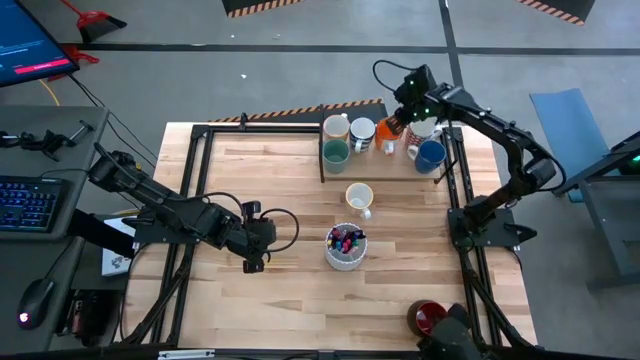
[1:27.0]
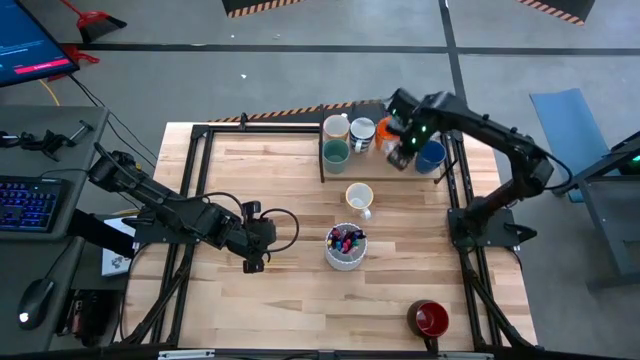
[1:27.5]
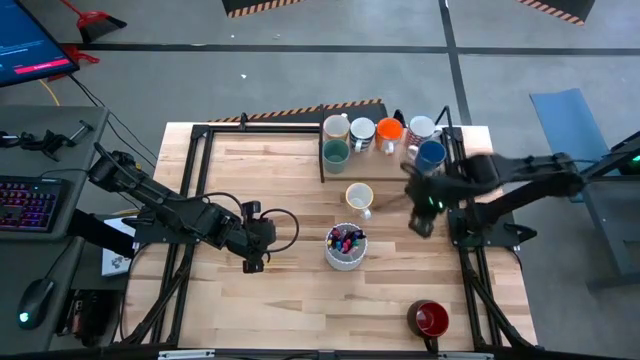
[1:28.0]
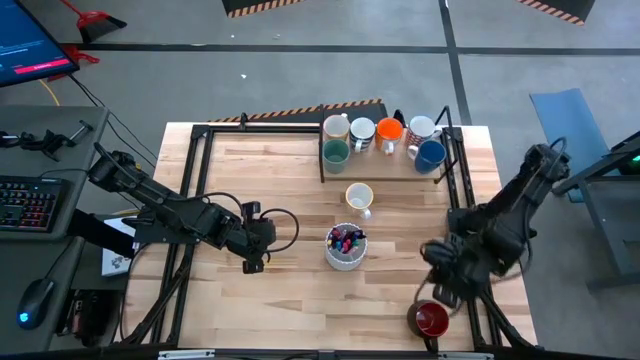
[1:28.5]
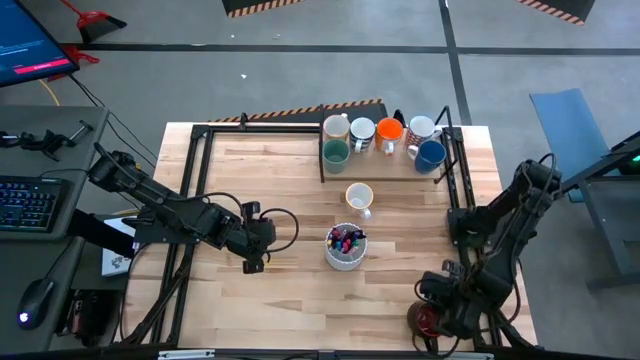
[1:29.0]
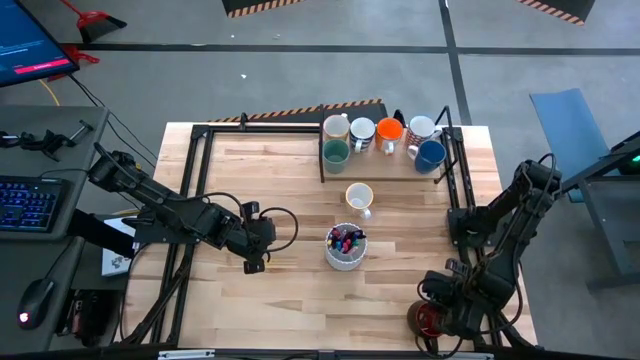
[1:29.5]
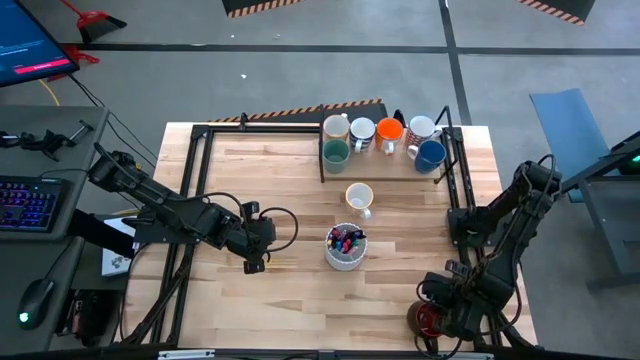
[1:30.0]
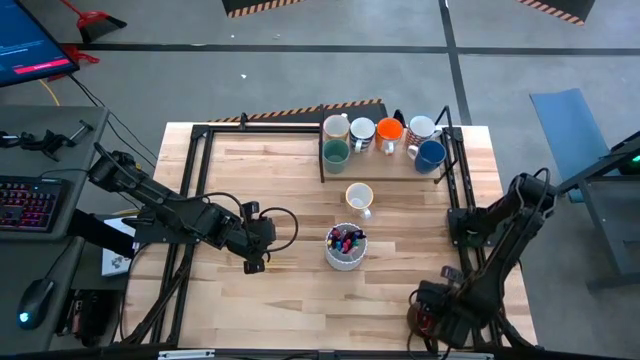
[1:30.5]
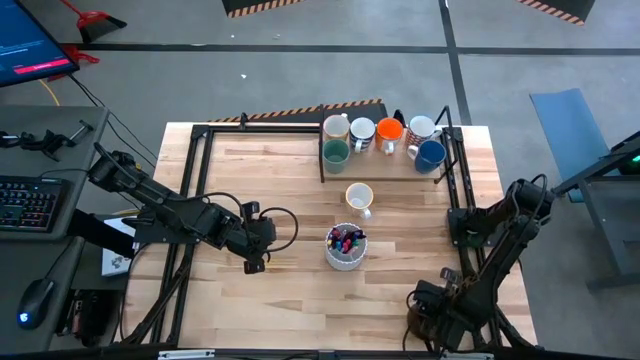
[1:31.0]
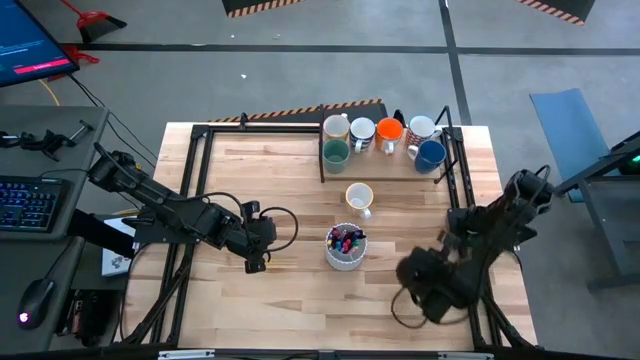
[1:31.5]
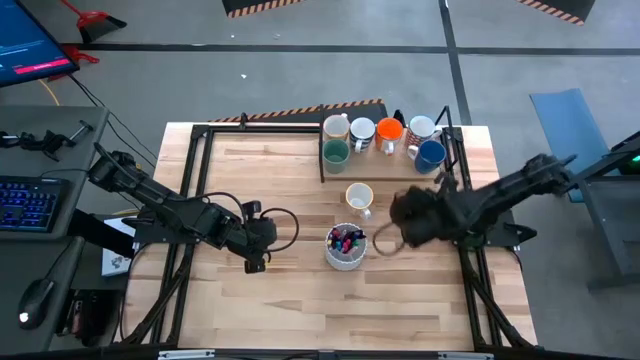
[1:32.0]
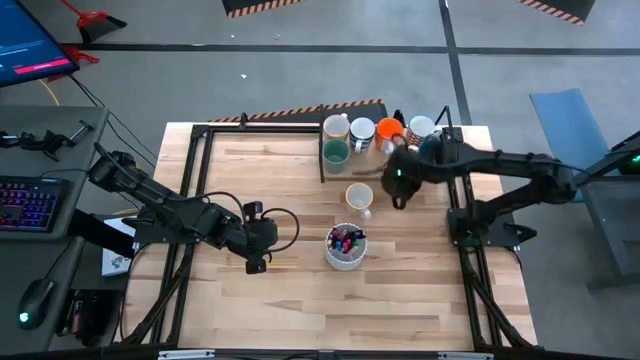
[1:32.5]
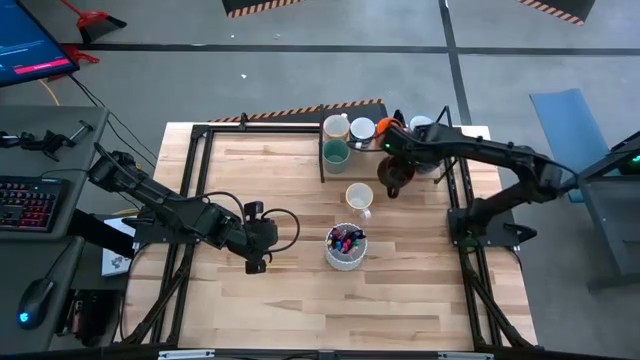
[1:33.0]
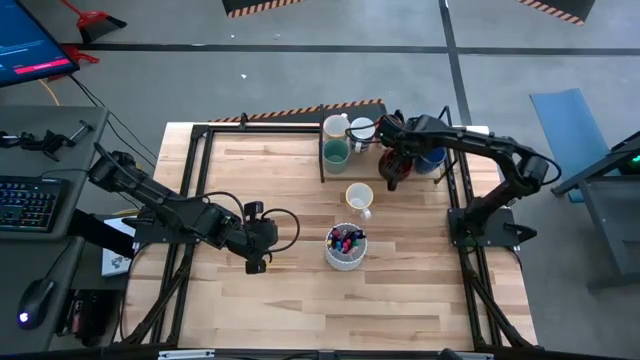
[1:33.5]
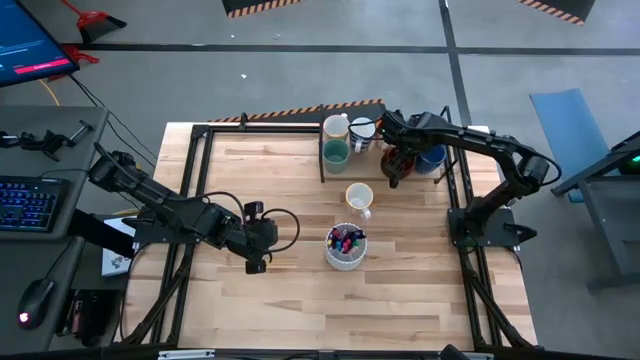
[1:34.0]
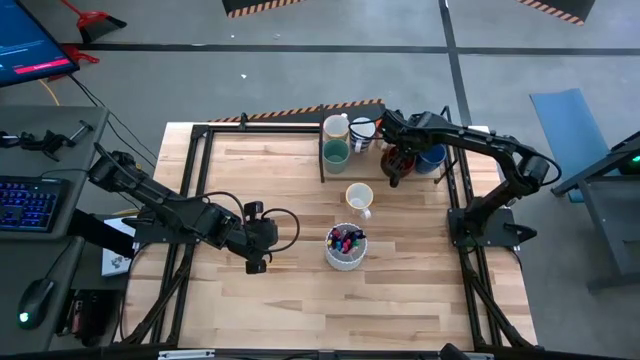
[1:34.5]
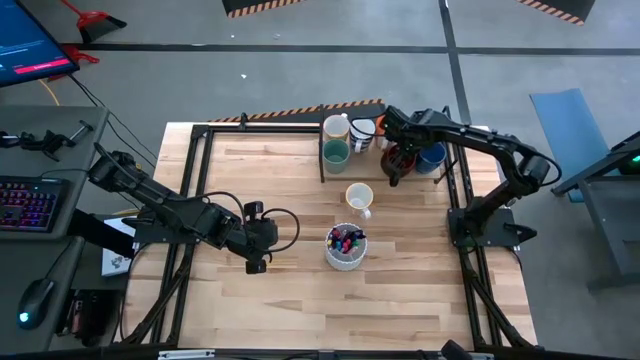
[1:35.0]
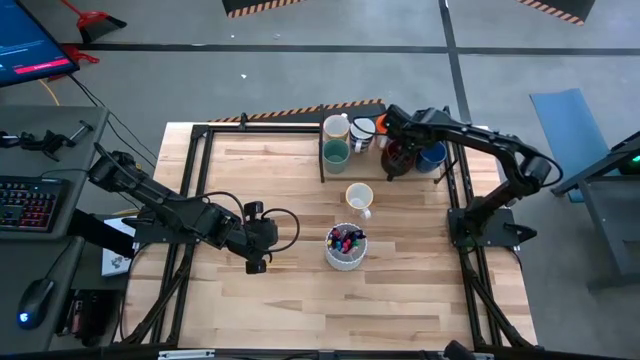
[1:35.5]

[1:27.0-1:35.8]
Task: Place coffee mugs
Put the black mug on the shelf

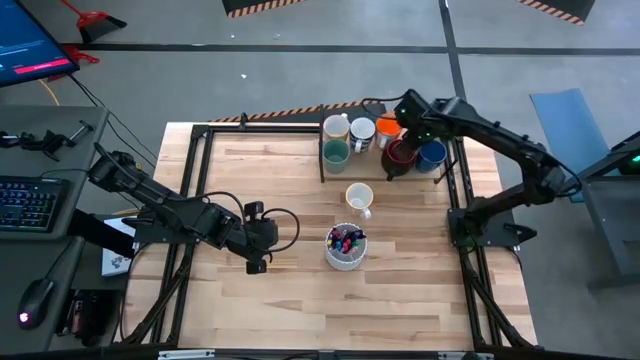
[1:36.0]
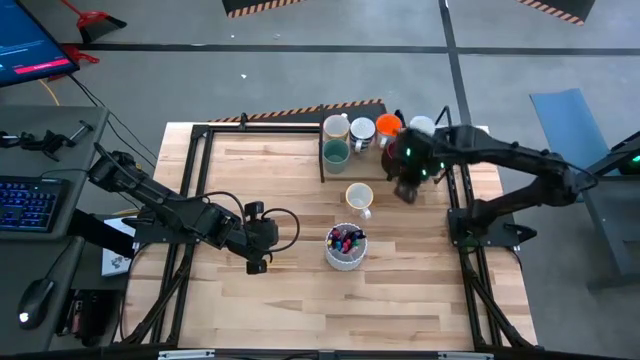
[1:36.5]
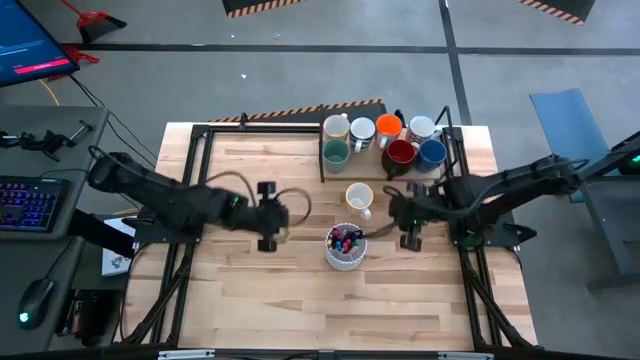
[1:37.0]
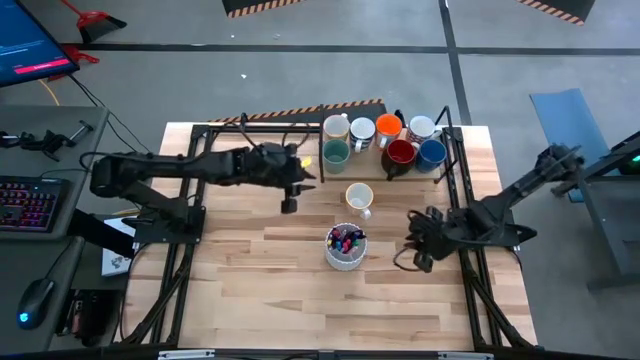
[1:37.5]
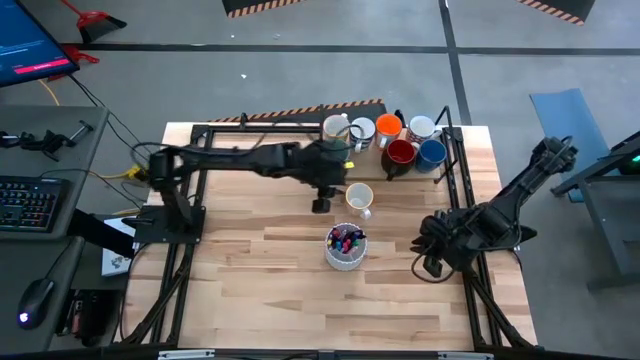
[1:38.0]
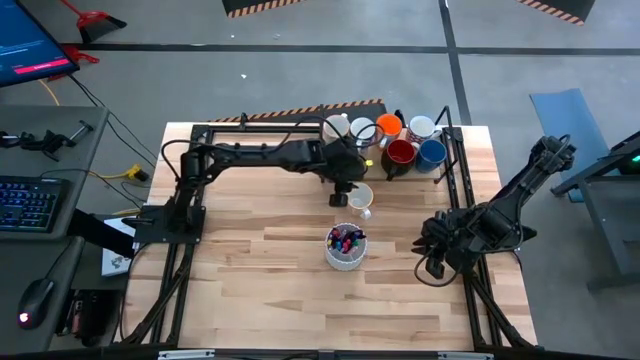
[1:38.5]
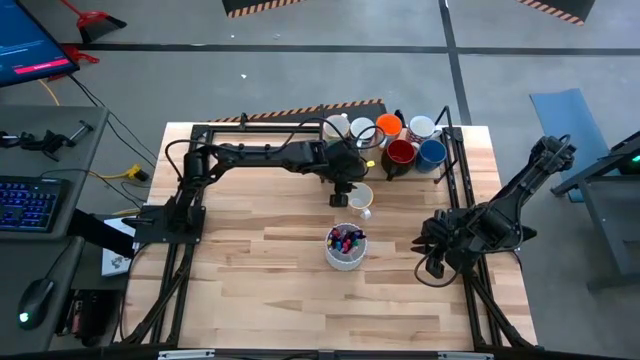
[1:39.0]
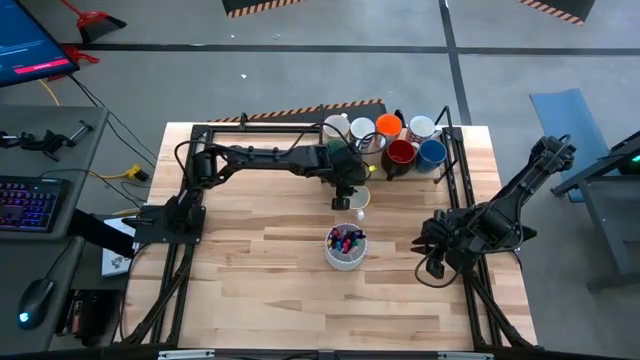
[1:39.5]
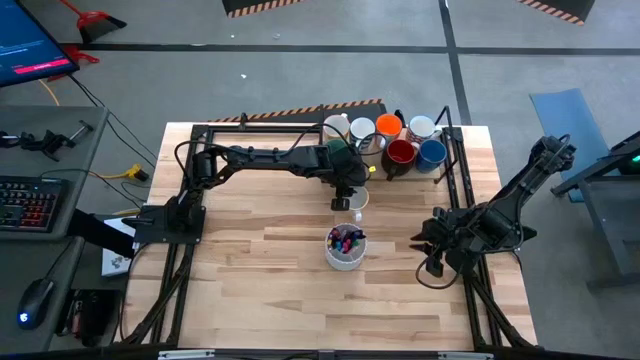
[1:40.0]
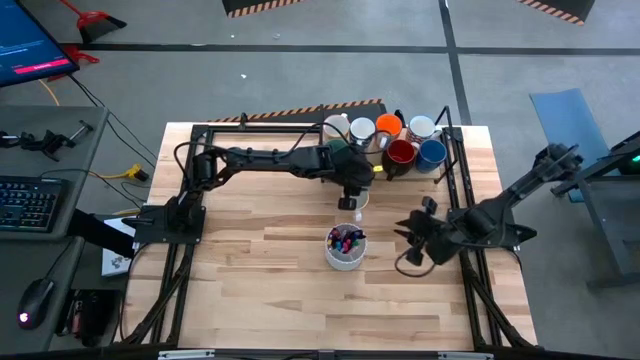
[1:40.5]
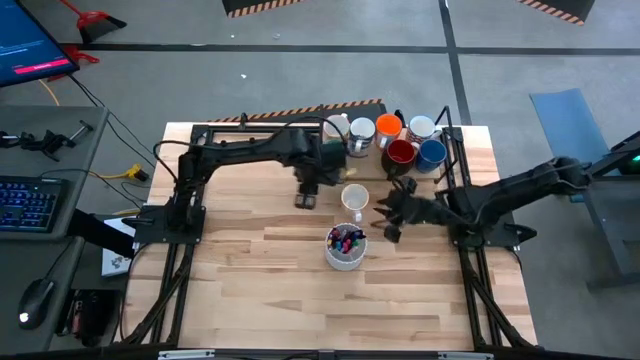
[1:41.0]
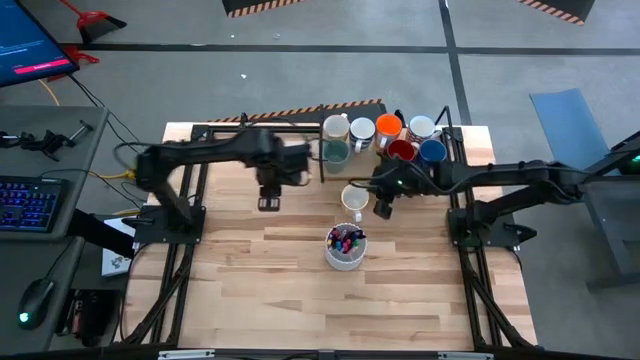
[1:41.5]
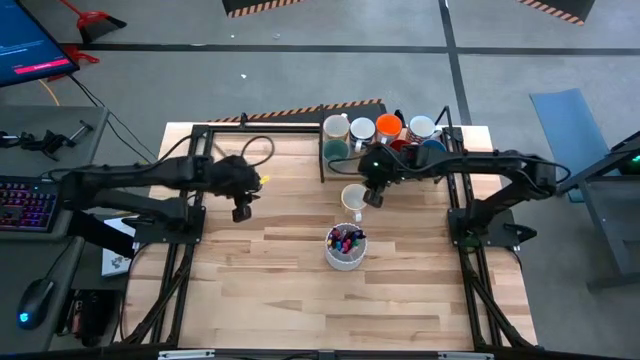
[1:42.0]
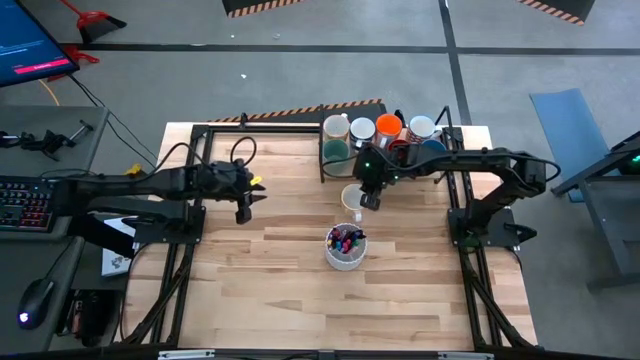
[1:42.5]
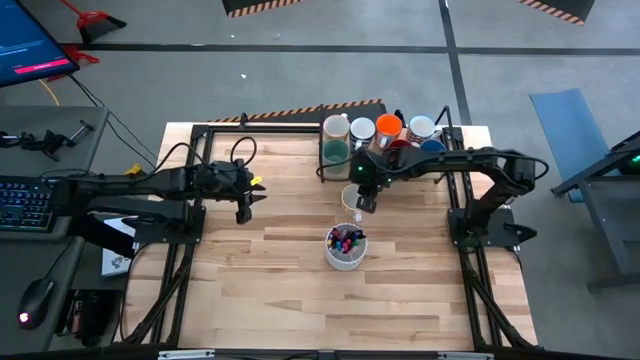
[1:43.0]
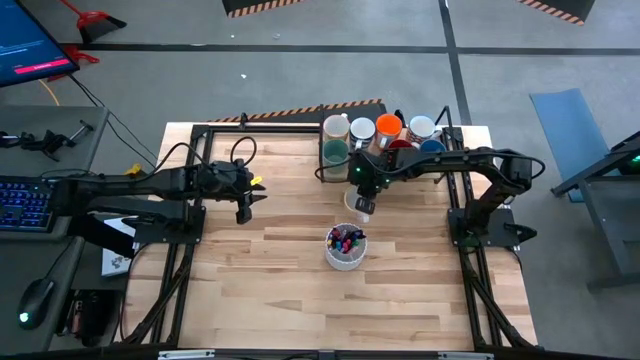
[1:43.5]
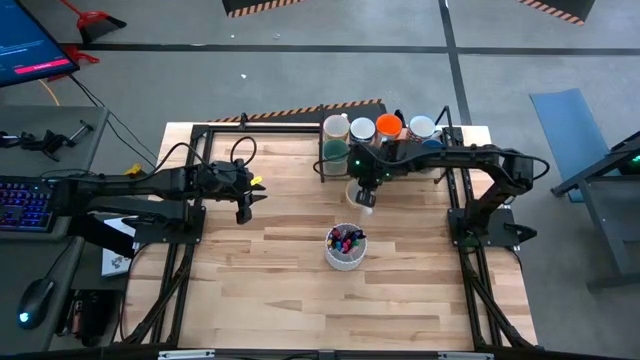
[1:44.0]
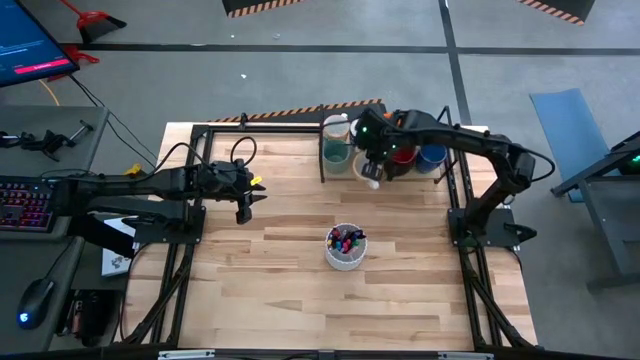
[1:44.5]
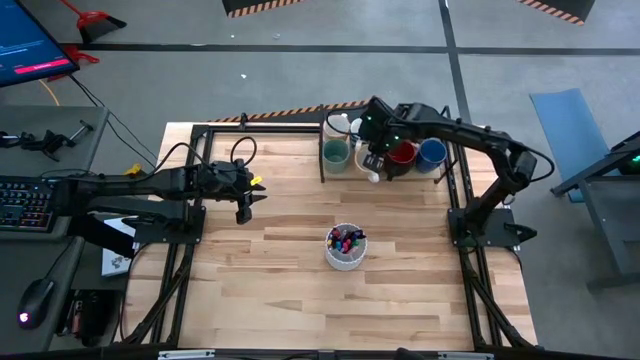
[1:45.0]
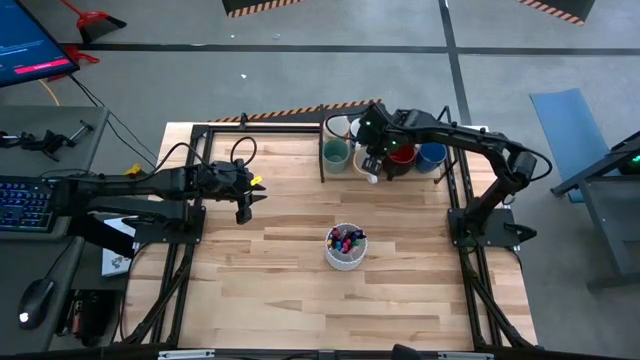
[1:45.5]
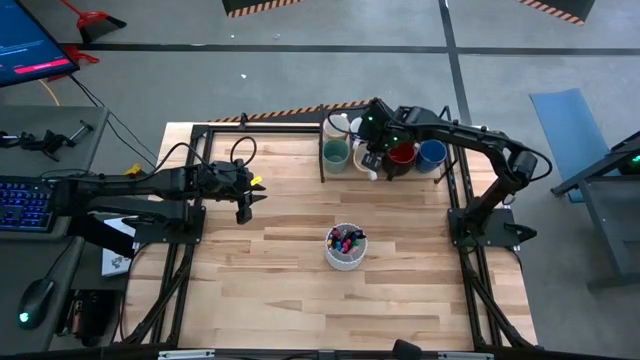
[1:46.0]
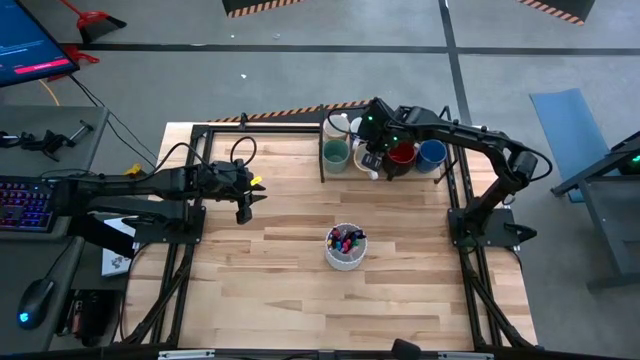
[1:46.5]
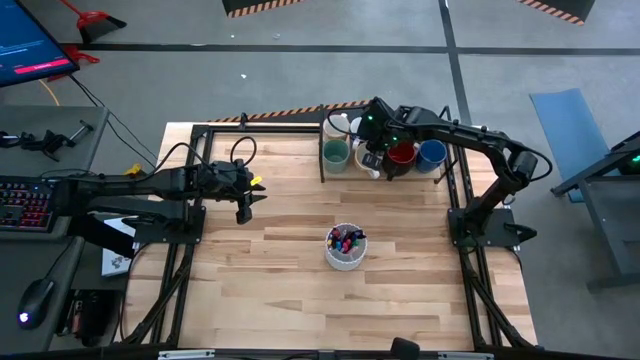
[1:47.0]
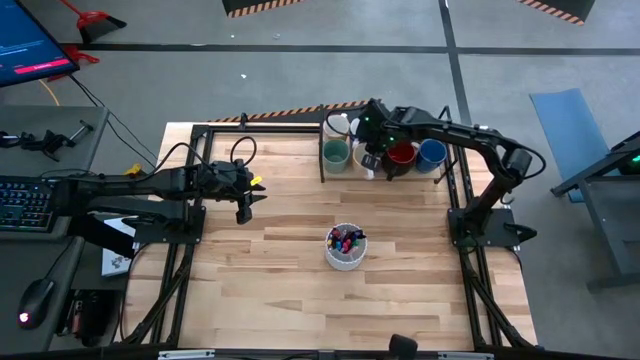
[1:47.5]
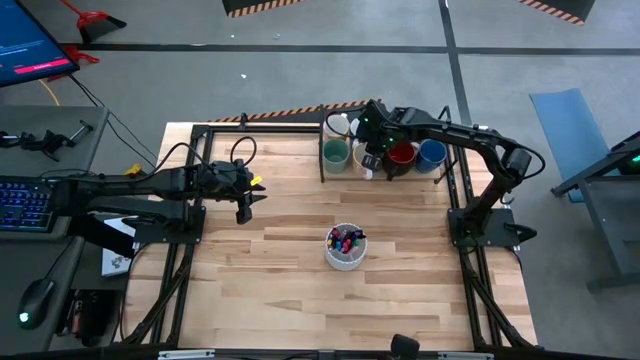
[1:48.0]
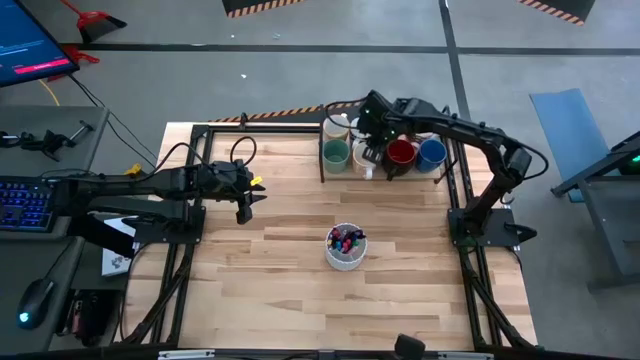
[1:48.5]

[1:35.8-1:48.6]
Put the orange patterned mug on the shelf
